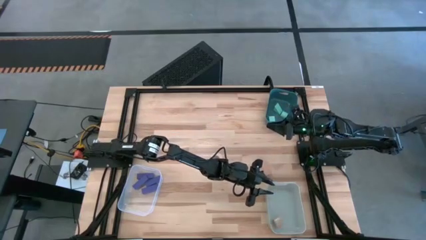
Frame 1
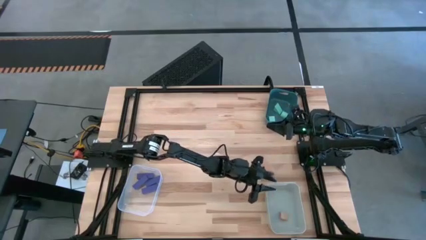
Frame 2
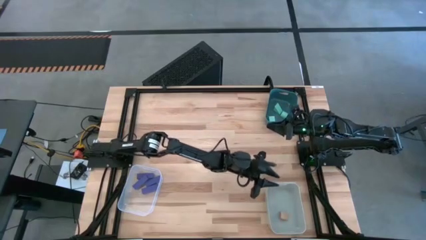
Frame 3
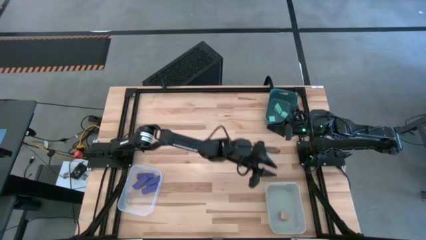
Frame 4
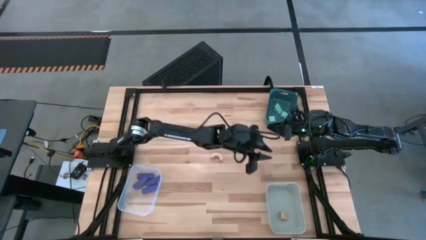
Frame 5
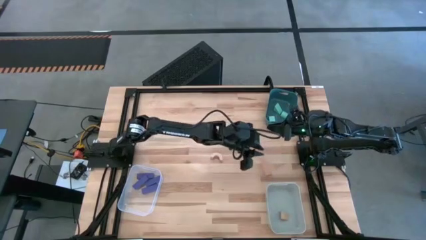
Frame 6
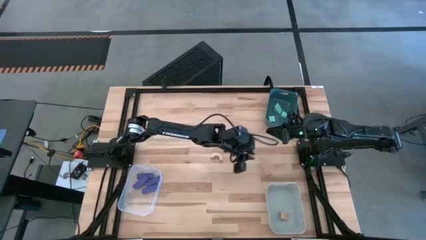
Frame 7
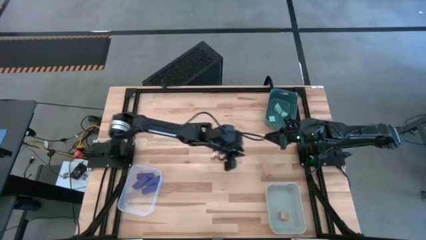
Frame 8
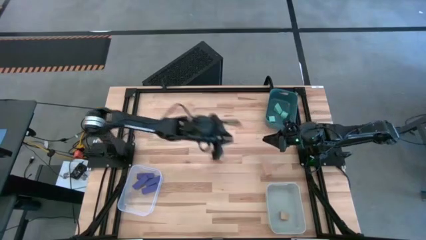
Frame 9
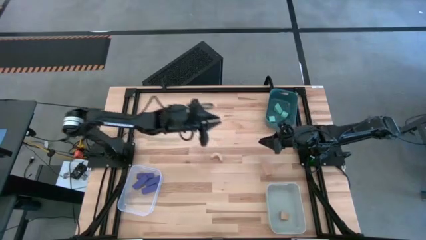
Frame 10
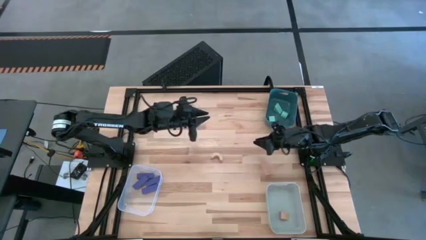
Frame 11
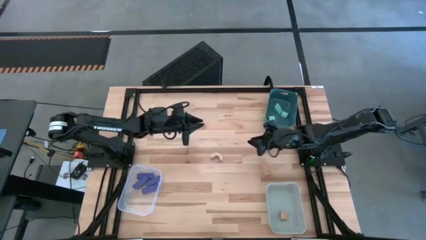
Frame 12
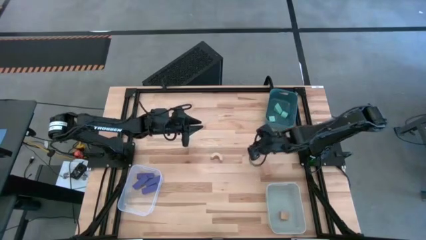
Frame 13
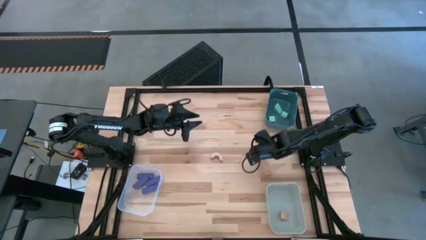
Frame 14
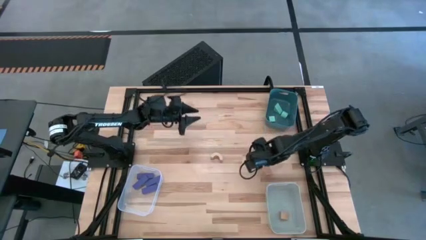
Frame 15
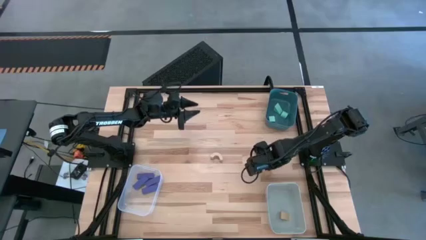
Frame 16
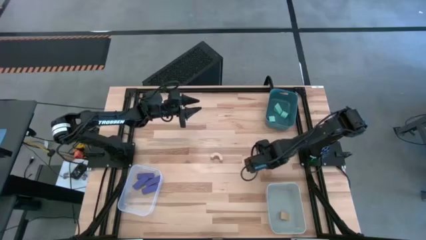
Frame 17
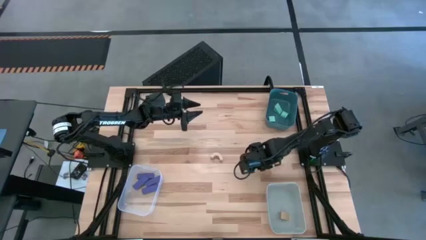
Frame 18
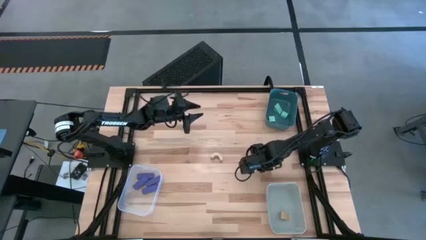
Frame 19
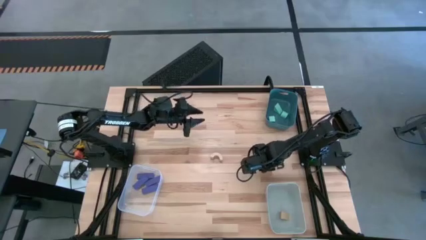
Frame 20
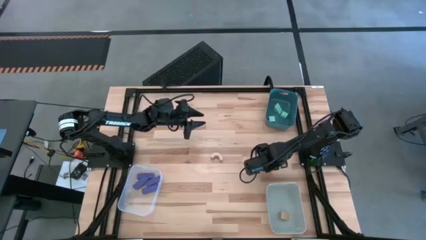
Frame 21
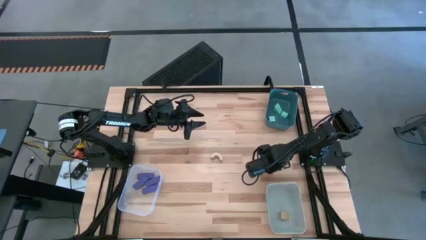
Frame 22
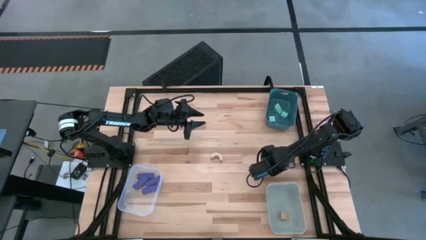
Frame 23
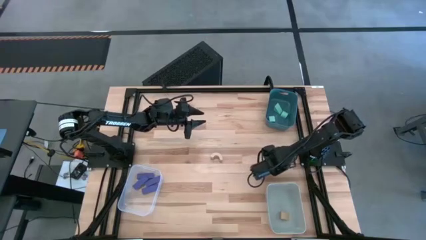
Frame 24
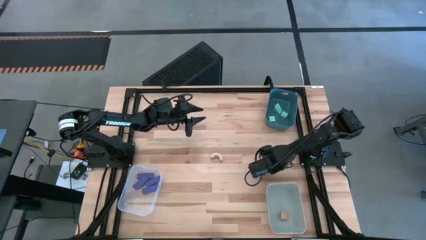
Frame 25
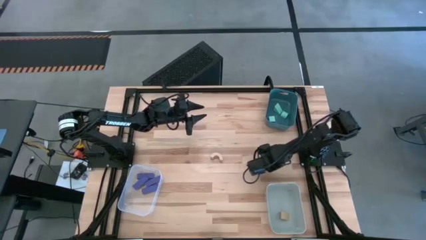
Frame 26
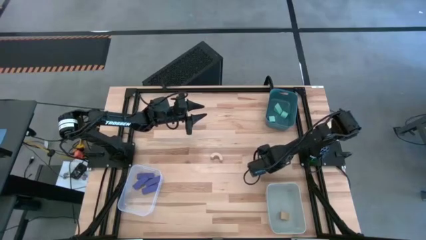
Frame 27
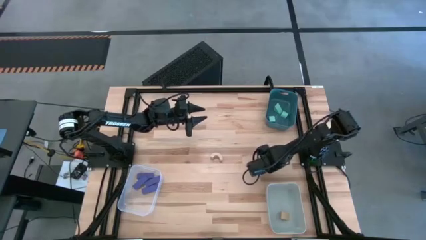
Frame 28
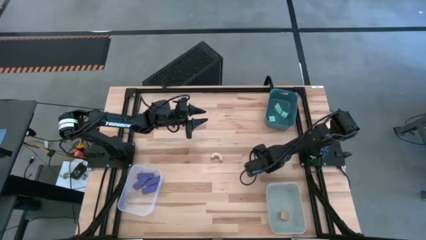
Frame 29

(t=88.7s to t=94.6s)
Task: Sort & place blocks by color
Put the bottom brown block into the gray bin

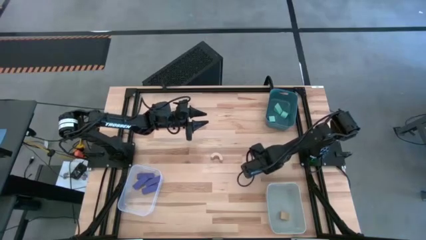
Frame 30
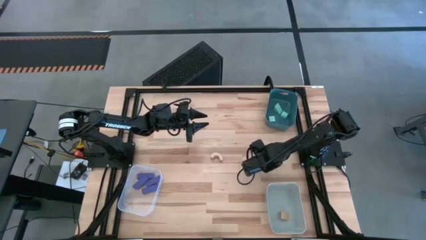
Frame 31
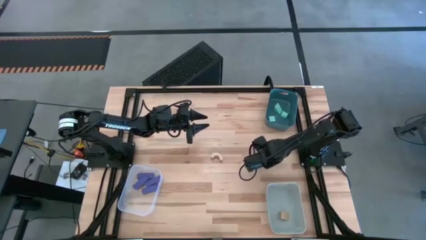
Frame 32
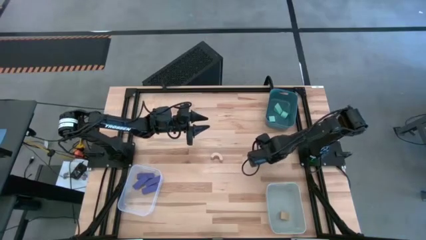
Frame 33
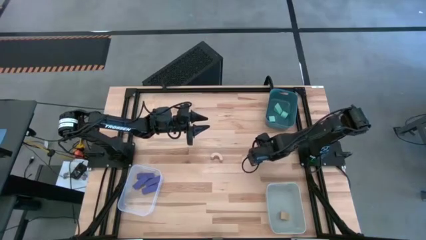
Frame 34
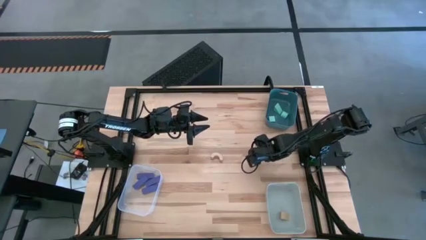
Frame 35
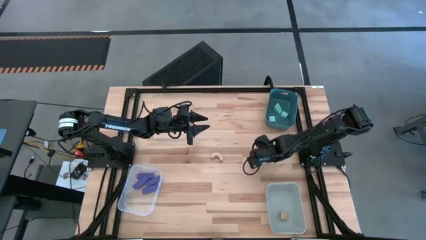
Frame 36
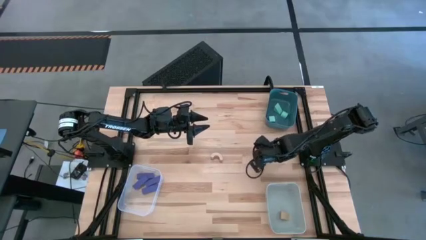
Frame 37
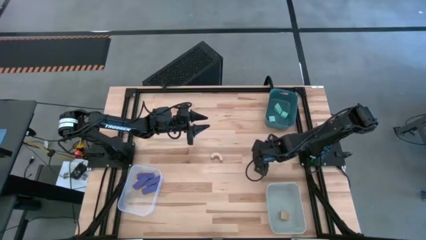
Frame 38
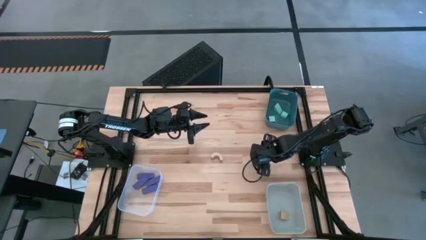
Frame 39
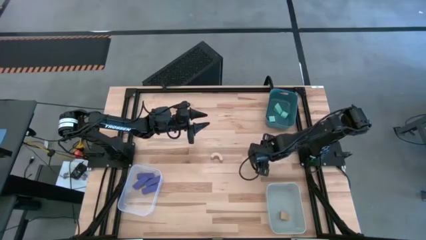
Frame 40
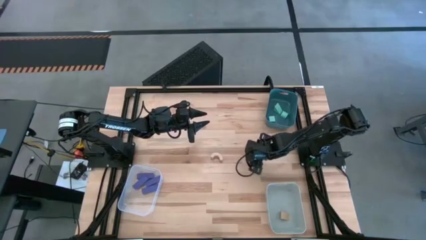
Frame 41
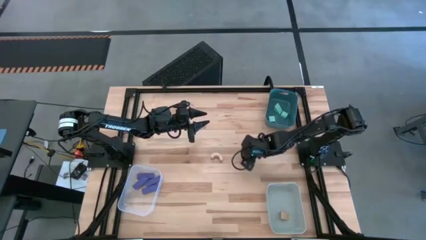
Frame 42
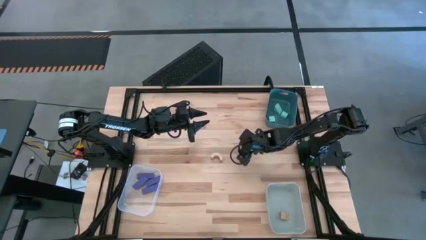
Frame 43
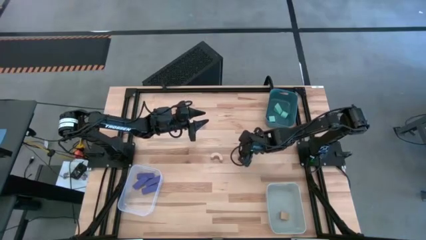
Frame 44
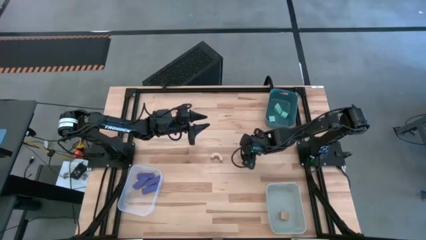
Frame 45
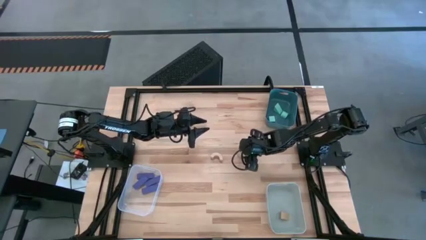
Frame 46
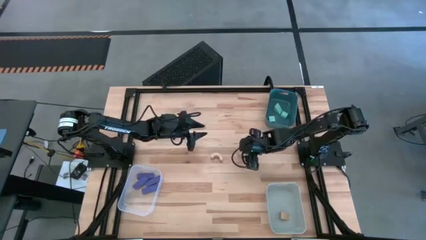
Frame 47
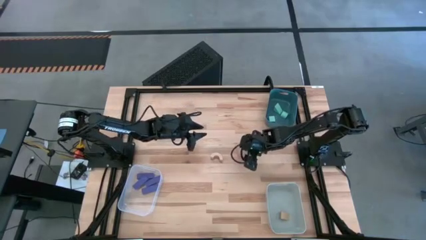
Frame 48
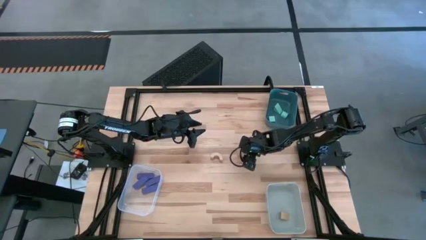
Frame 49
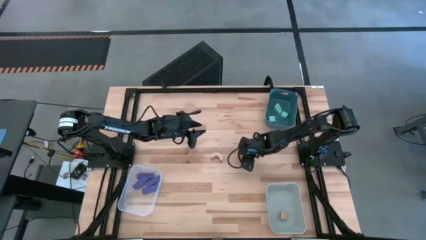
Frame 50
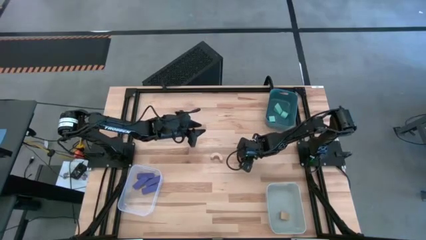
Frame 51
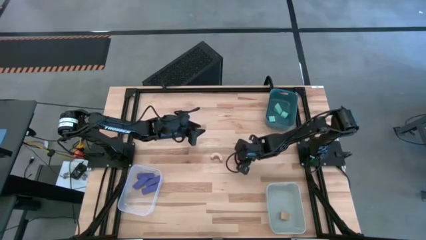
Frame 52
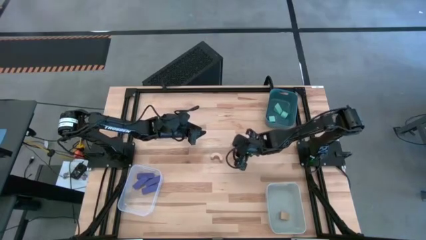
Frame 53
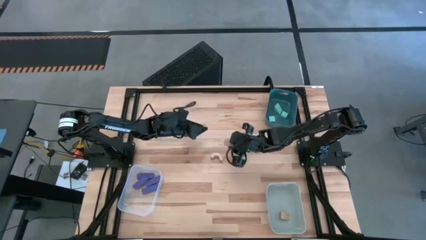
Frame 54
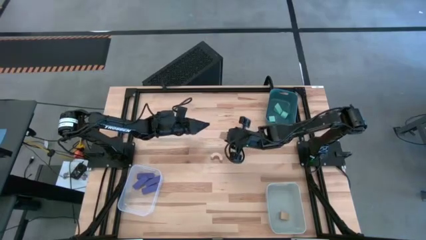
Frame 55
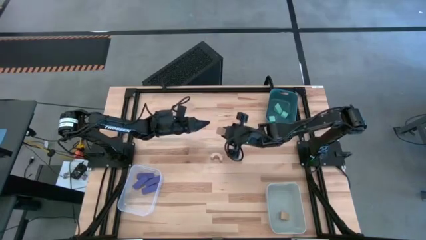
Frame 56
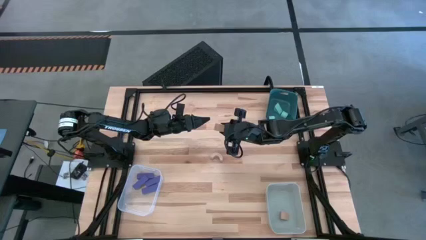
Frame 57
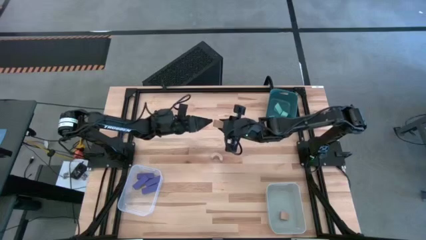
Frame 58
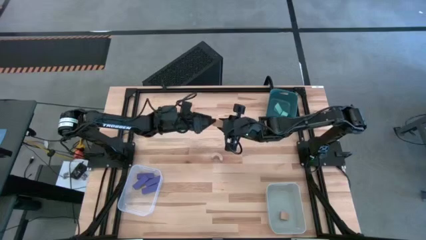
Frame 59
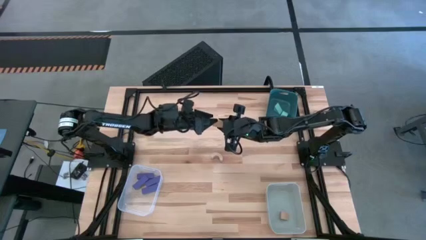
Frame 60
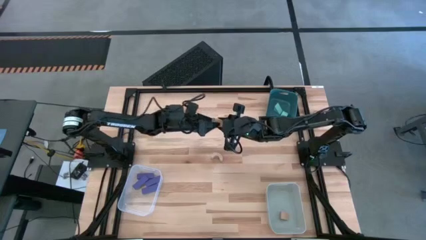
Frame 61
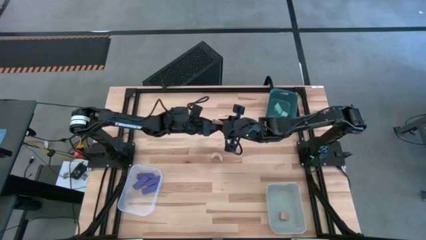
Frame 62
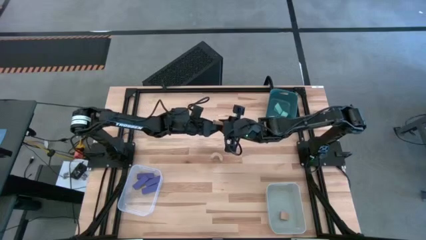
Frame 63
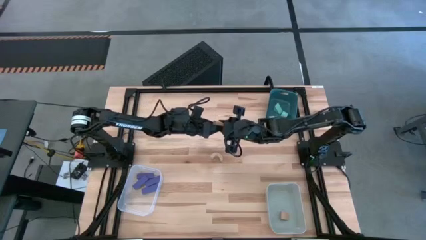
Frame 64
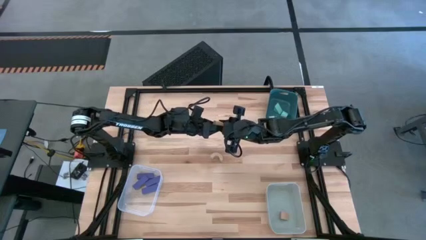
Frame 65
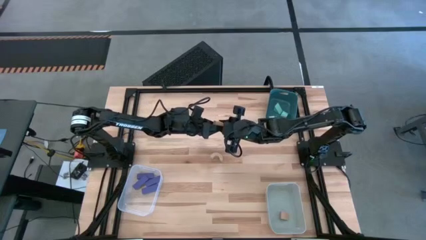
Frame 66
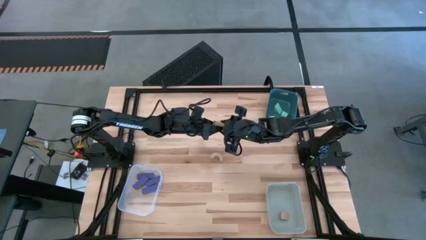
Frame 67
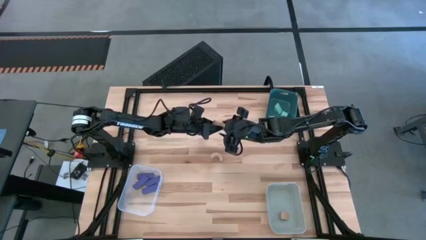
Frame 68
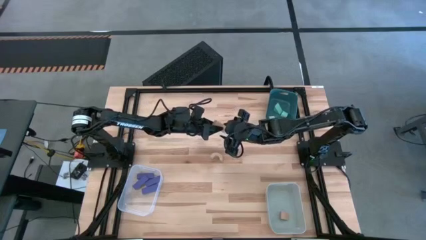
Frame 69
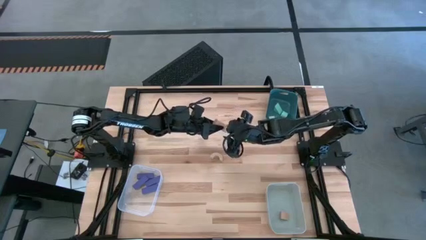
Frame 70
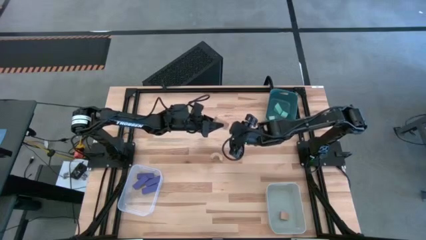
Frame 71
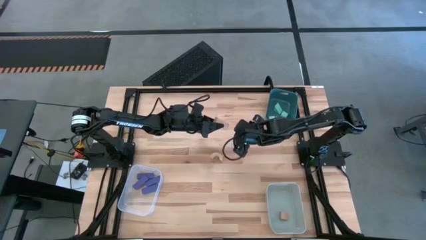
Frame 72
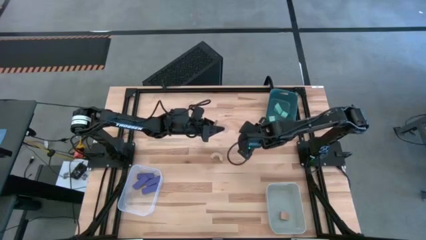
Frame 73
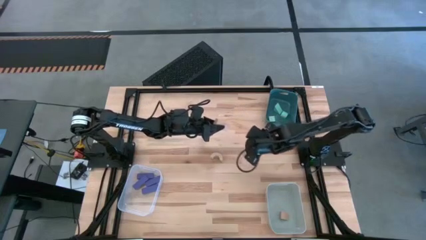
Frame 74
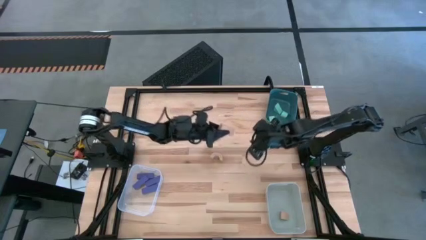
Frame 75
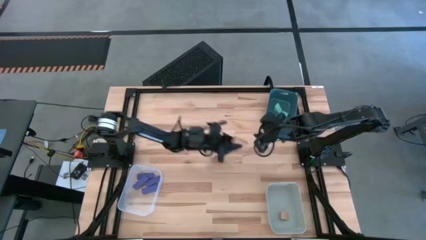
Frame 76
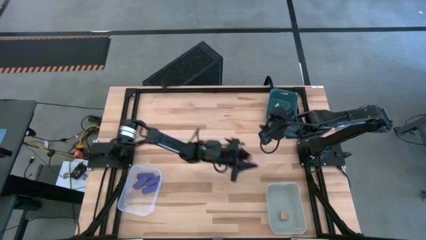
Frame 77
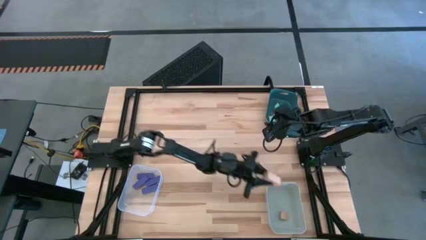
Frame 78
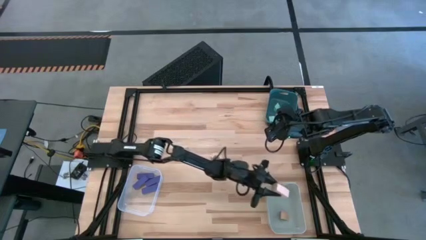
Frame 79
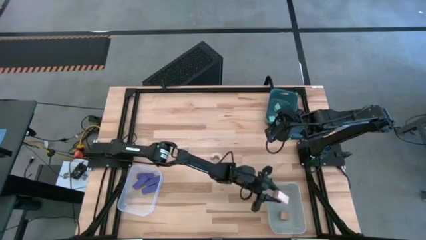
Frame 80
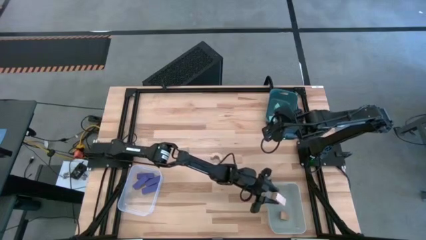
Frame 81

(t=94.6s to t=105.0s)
Put the bottom brown block into the gray bin
